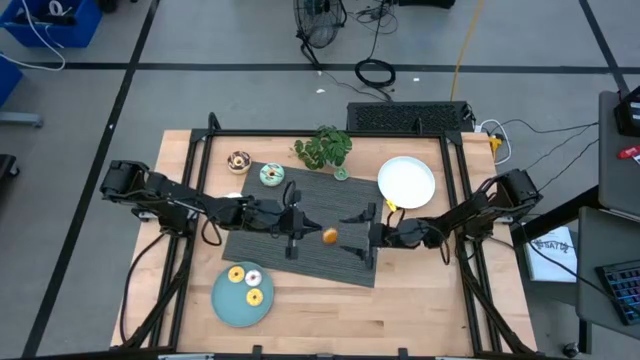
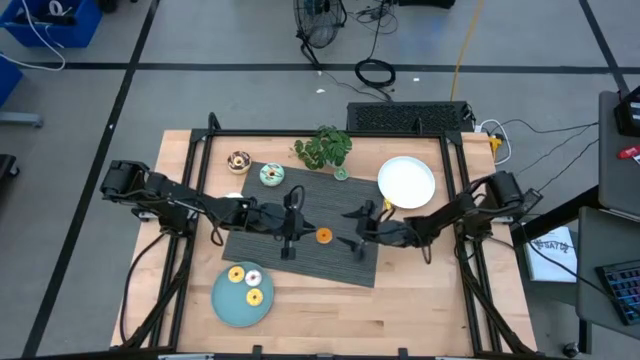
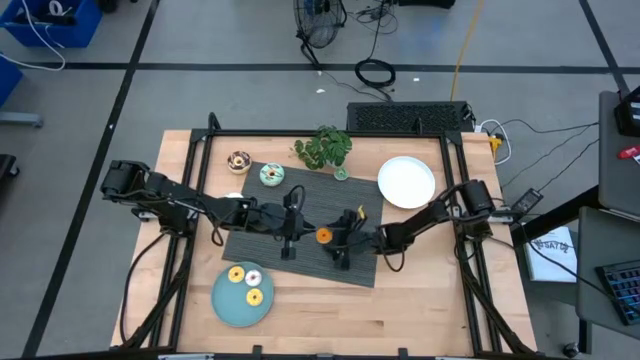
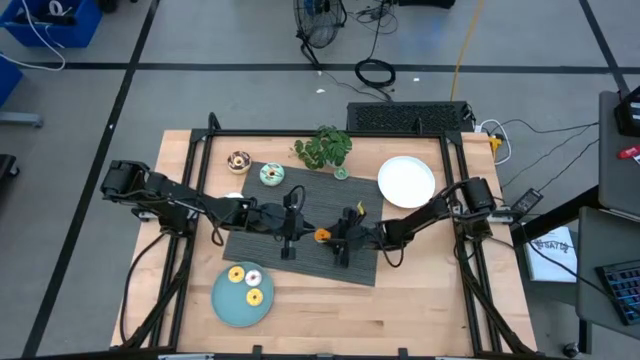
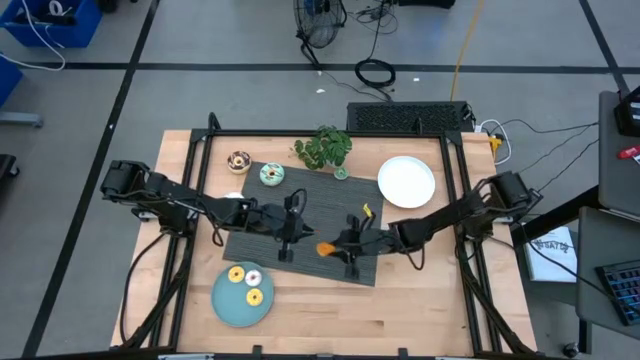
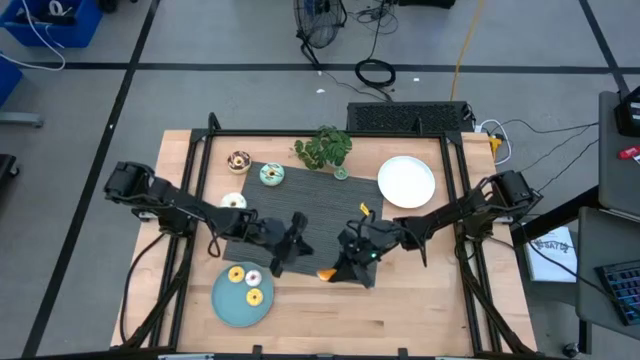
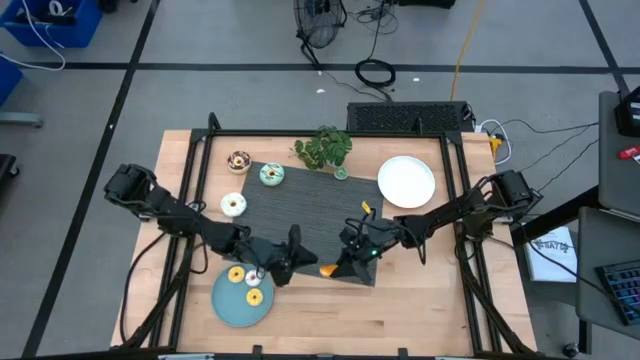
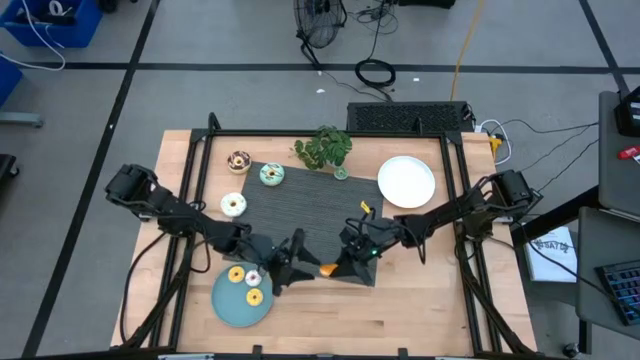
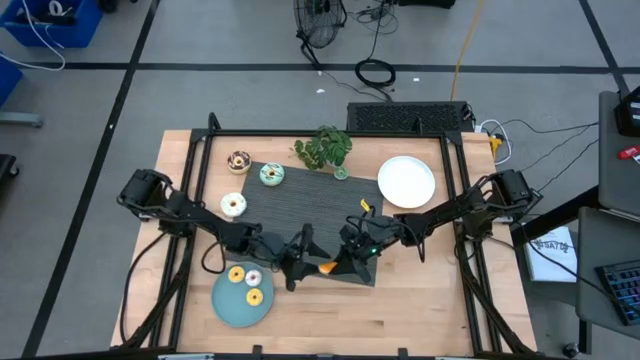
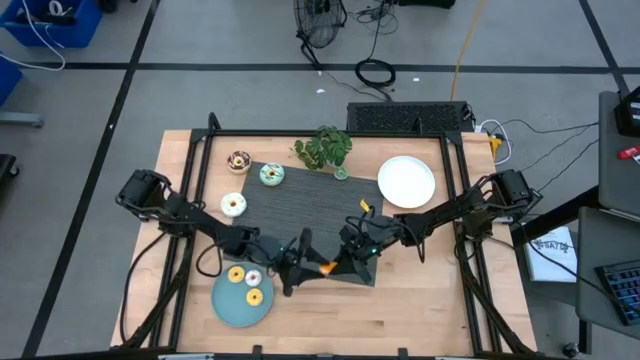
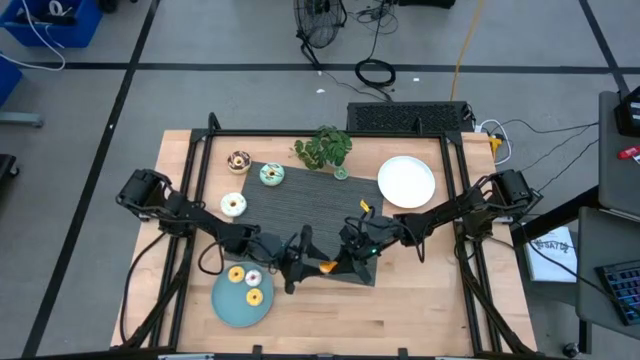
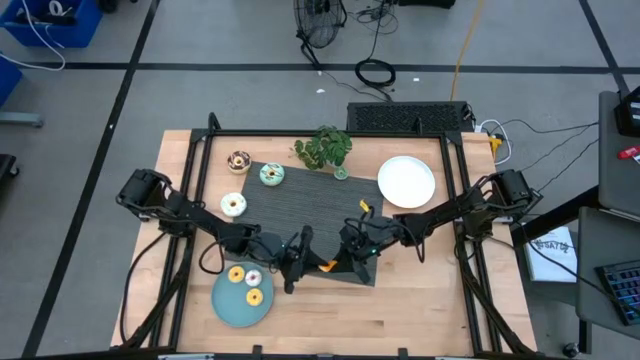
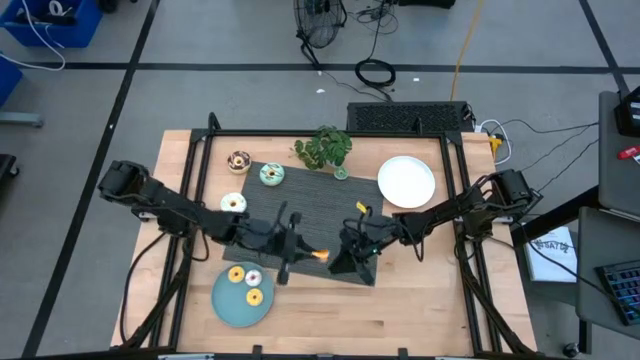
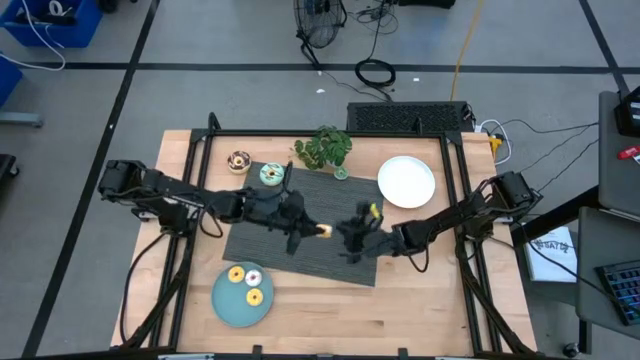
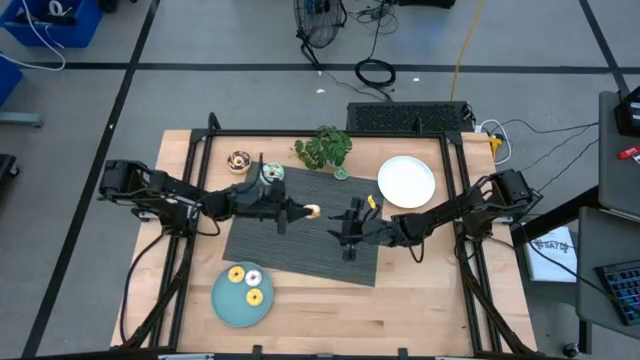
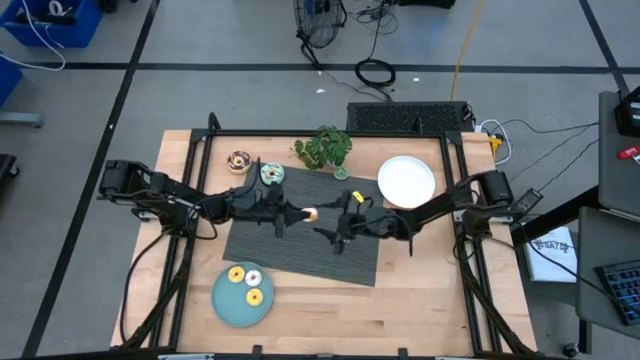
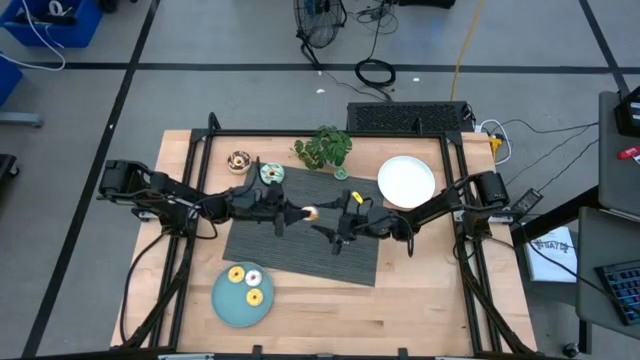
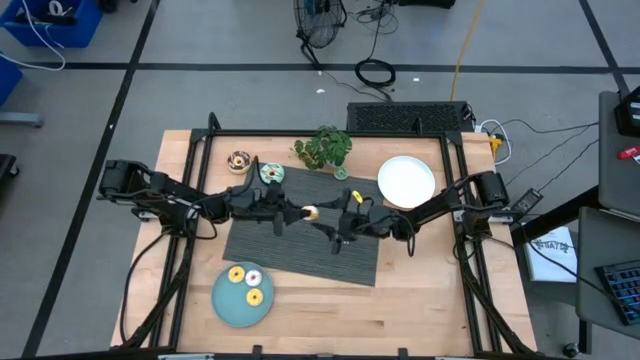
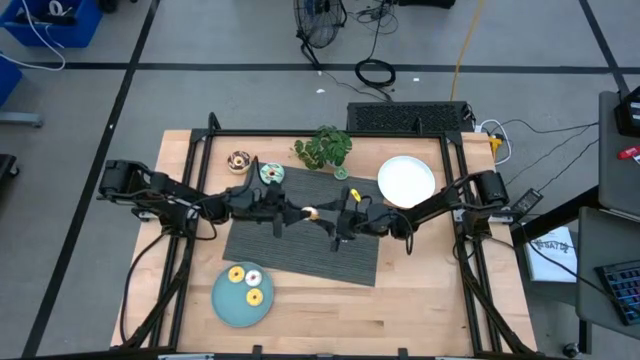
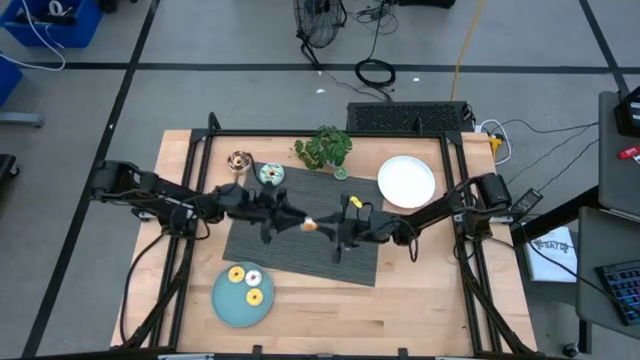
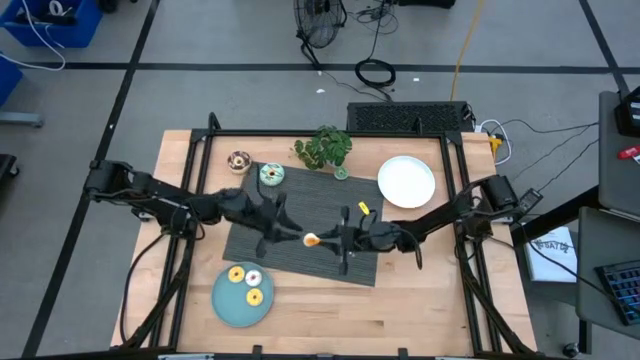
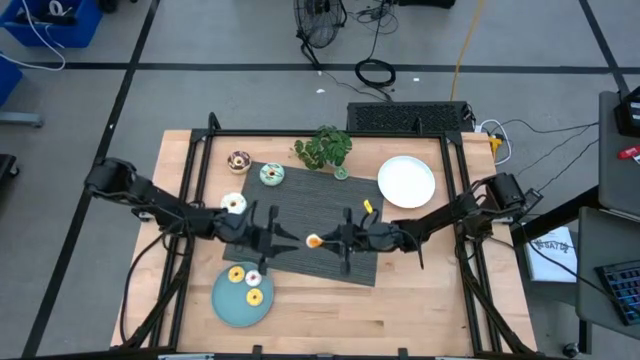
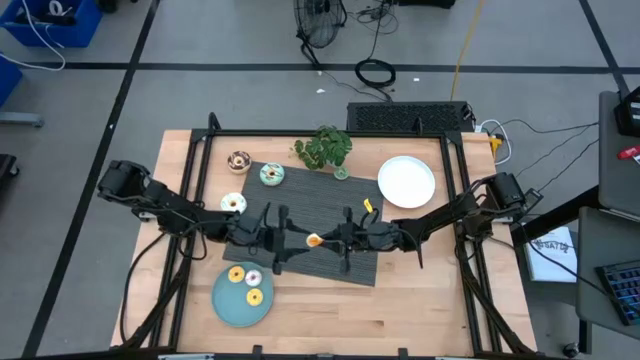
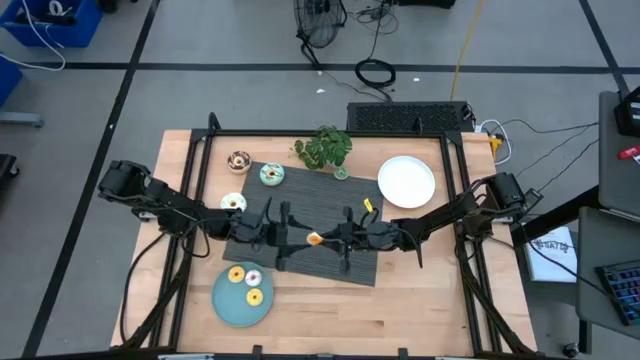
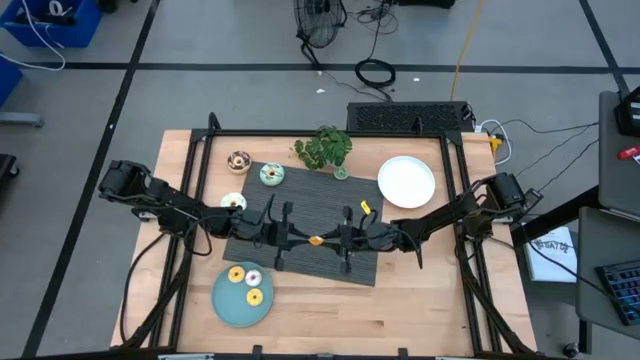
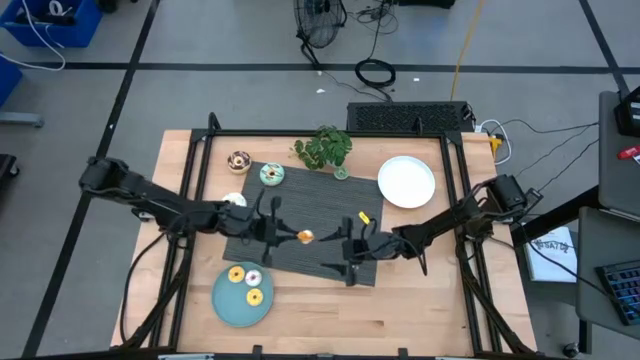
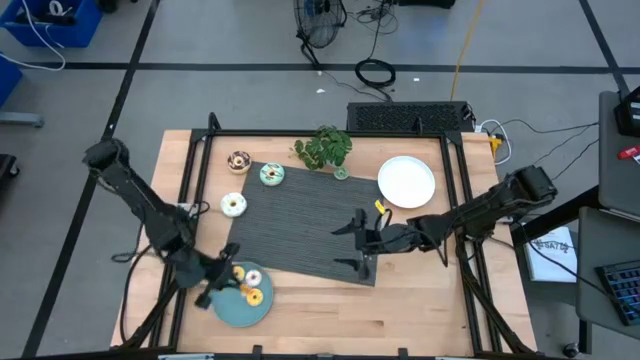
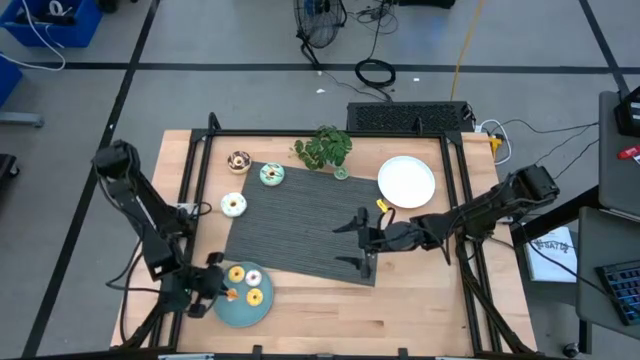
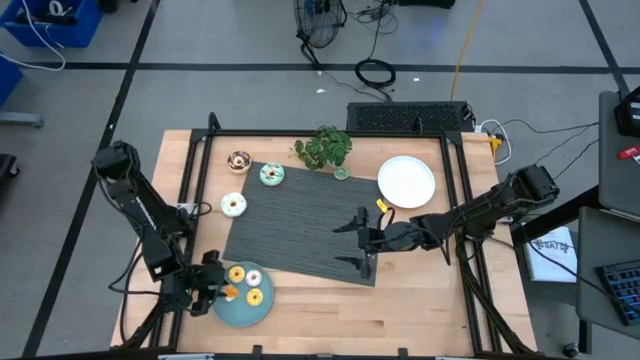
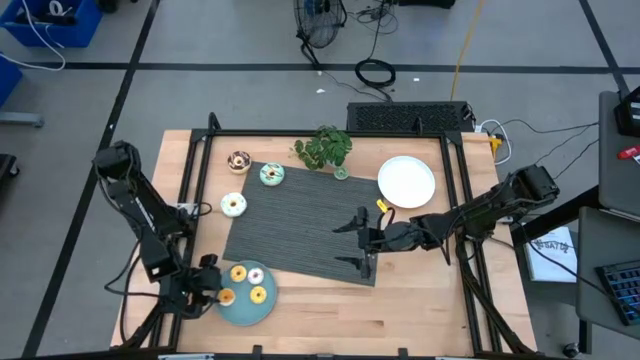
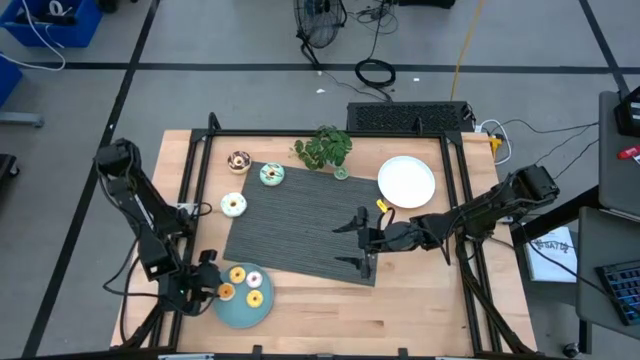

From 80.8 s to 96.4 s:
Task: Pick & Place donuts
Put the small orange donut on the blue plate

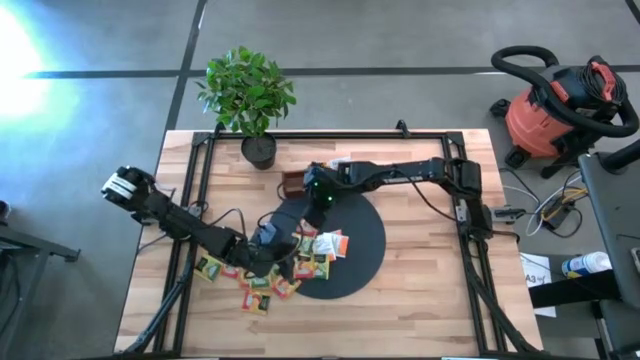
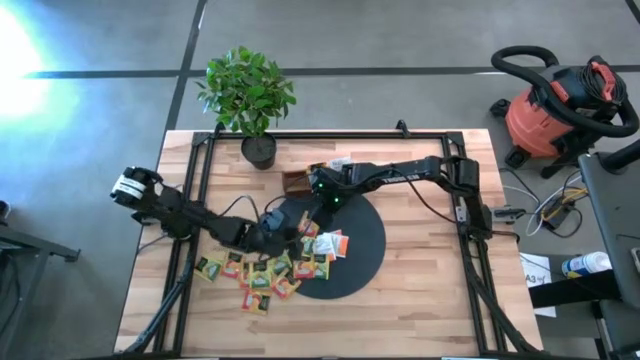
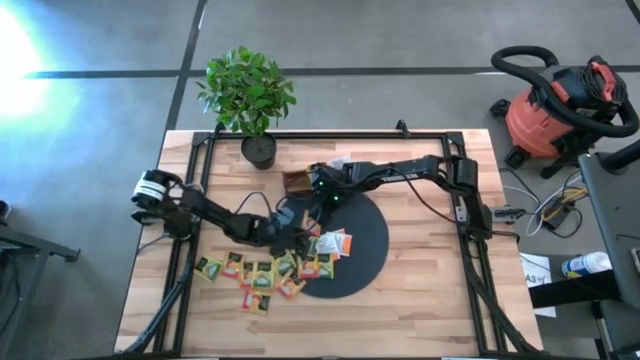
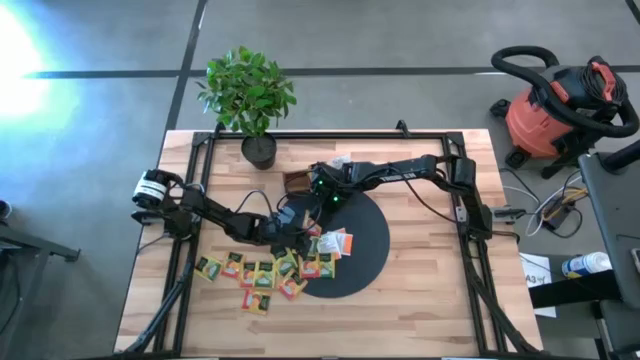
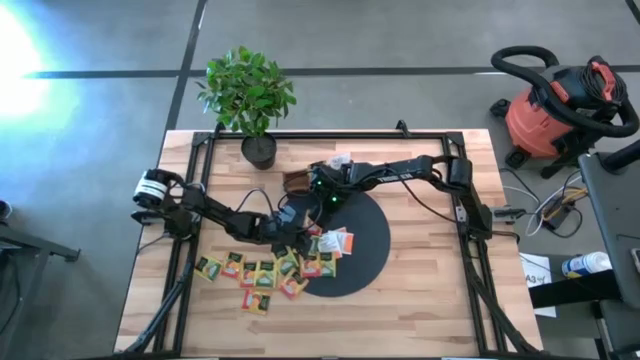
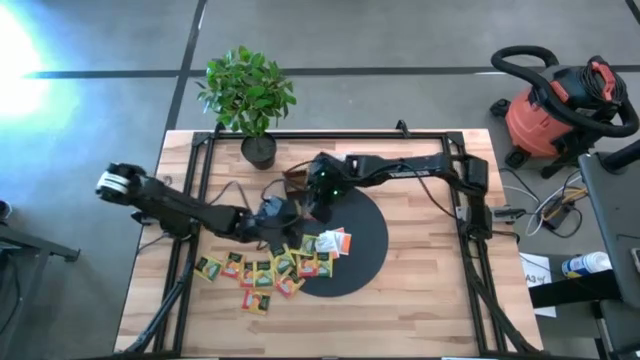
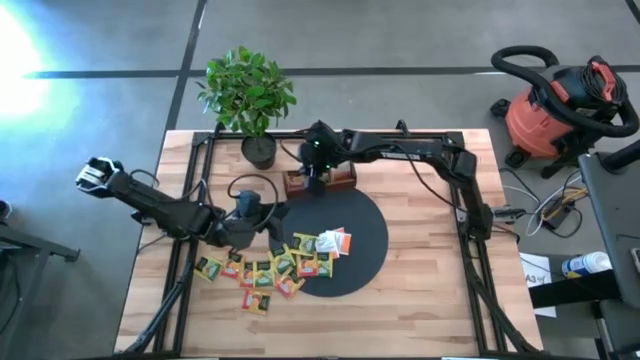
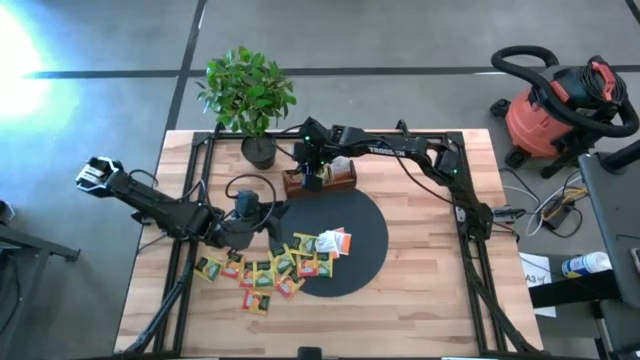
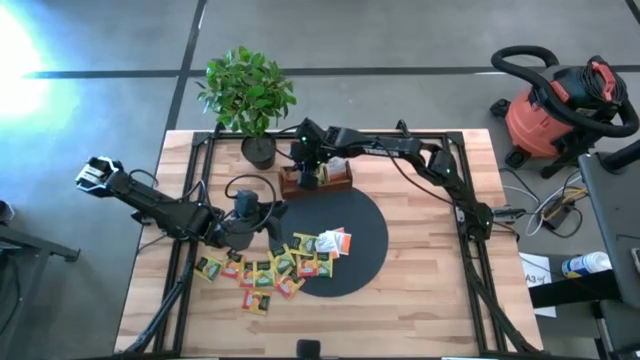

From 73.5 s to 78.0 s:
Task: Pick & Place Tea
Put the orange tea bag into the left slot of the wooden organizer
